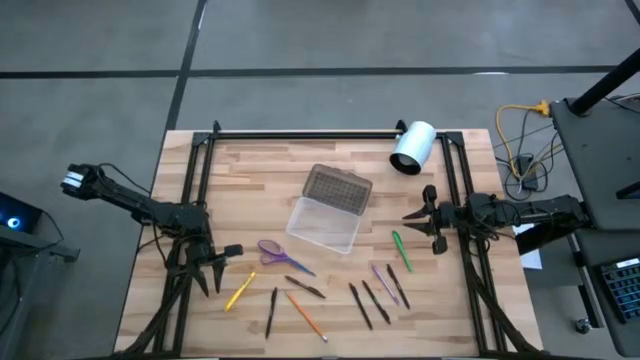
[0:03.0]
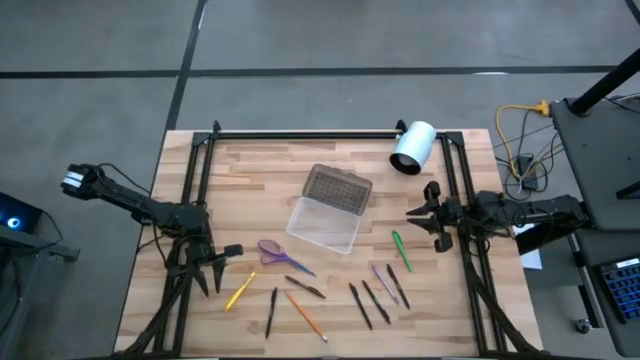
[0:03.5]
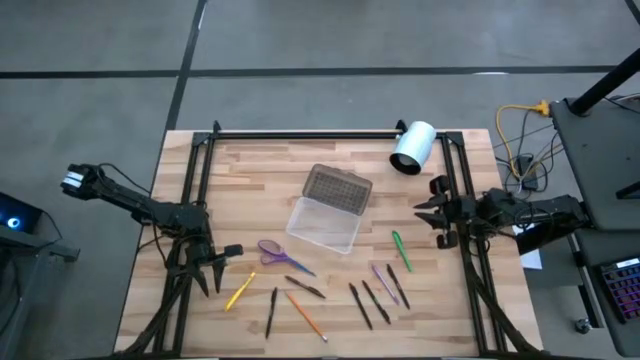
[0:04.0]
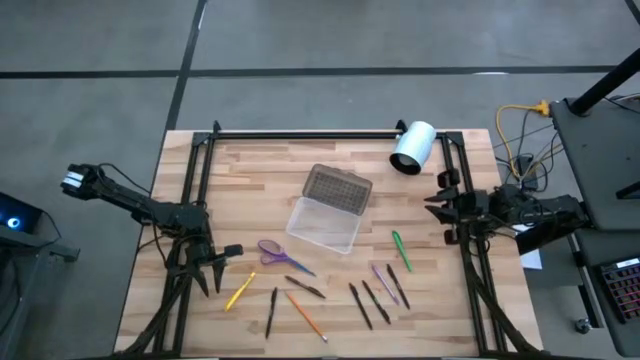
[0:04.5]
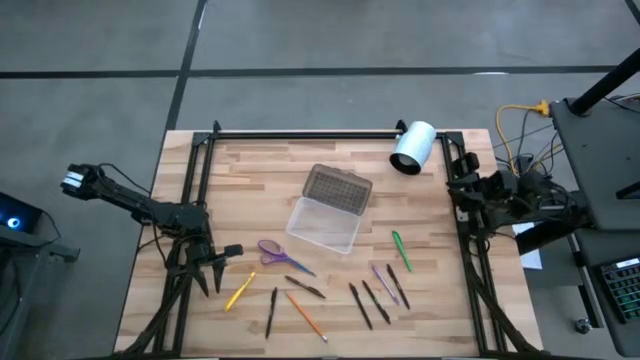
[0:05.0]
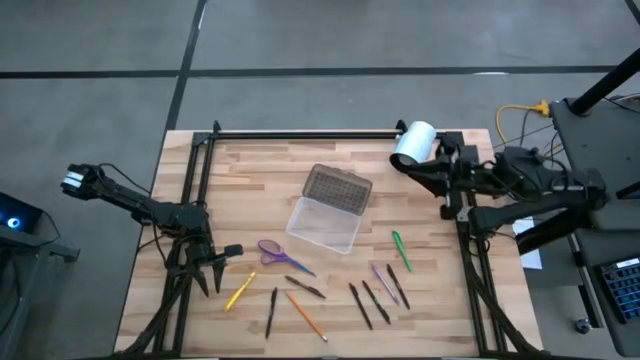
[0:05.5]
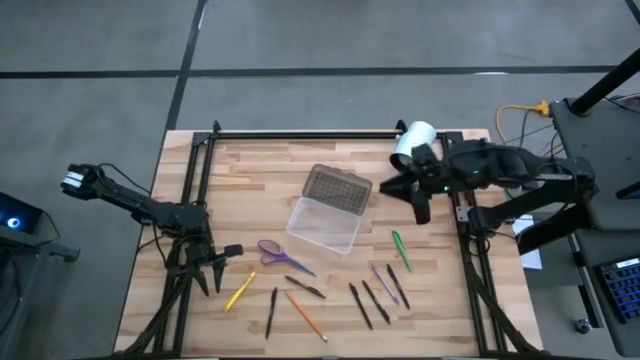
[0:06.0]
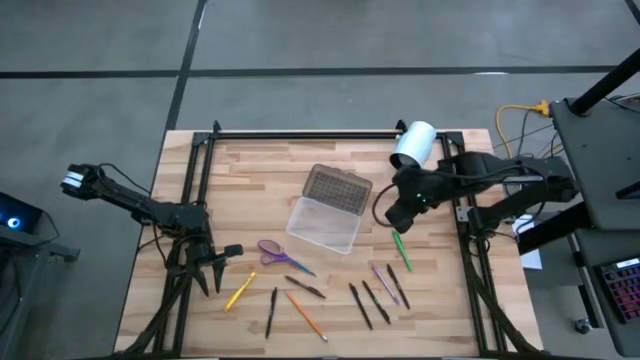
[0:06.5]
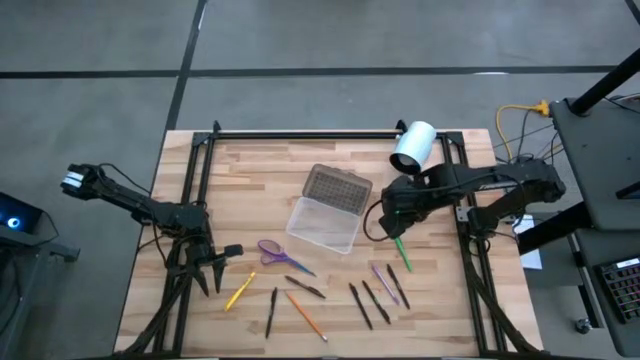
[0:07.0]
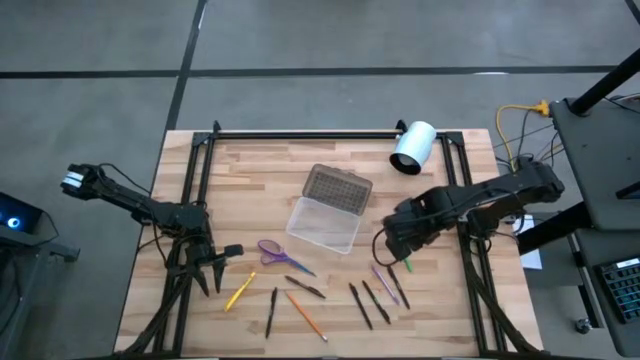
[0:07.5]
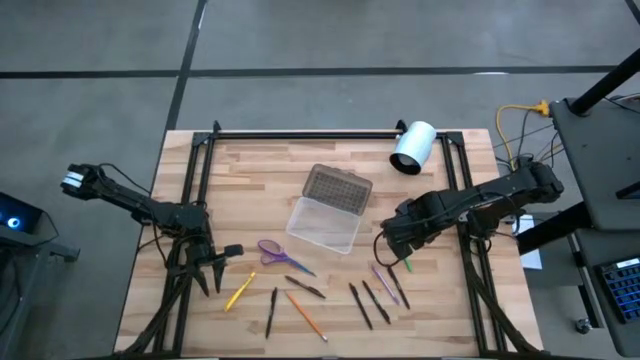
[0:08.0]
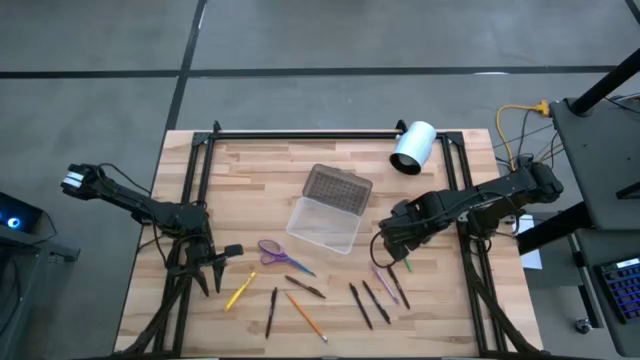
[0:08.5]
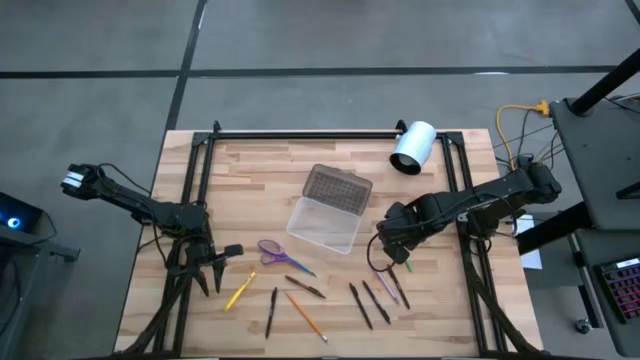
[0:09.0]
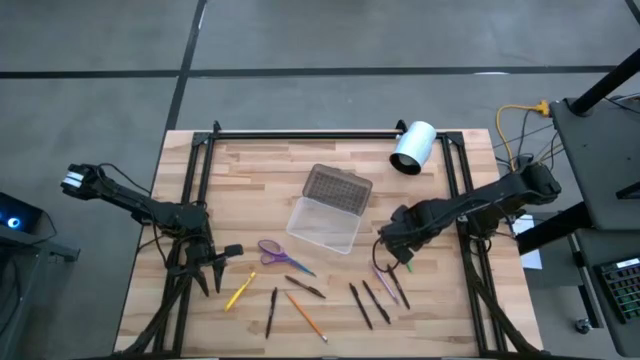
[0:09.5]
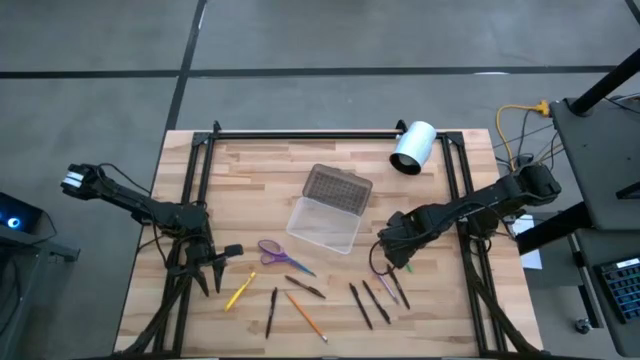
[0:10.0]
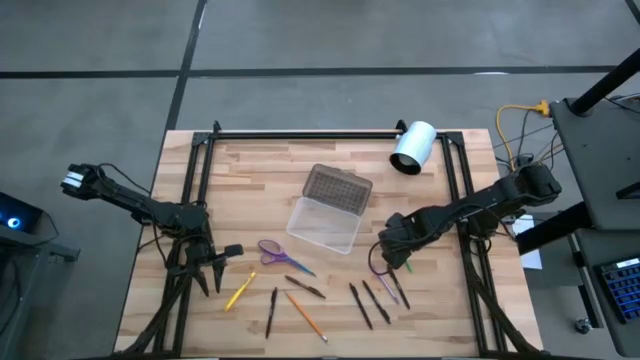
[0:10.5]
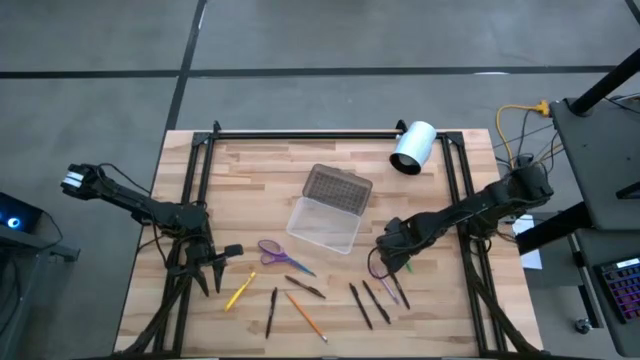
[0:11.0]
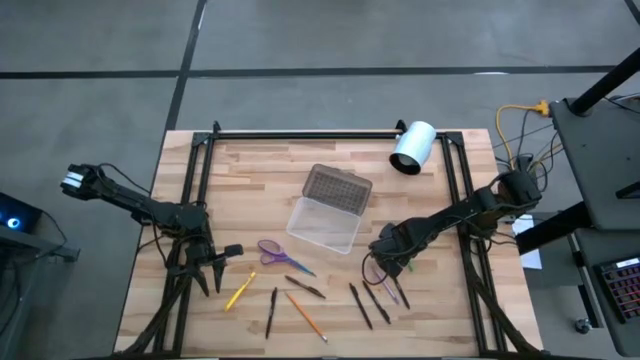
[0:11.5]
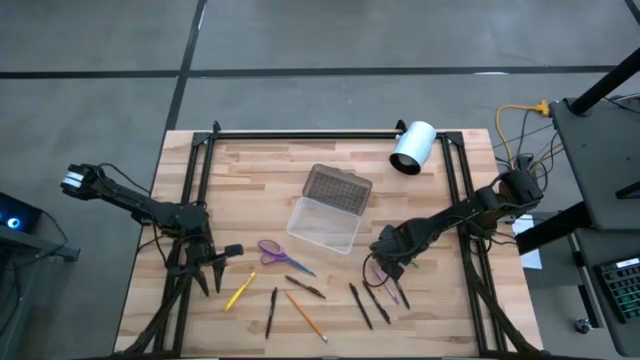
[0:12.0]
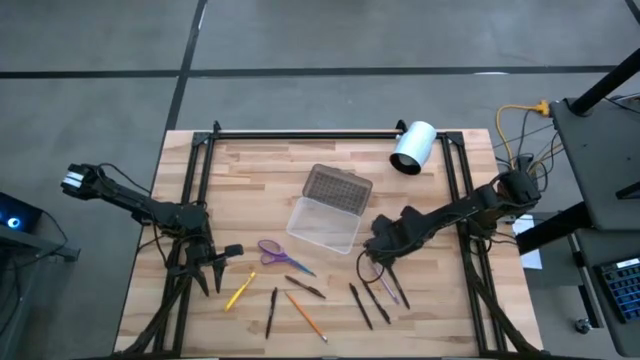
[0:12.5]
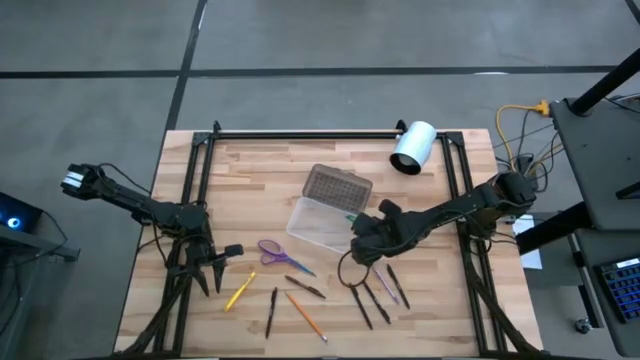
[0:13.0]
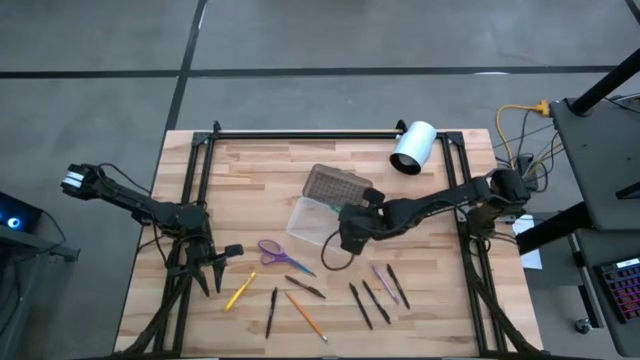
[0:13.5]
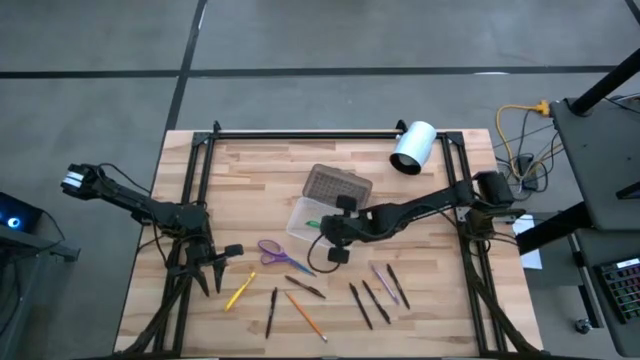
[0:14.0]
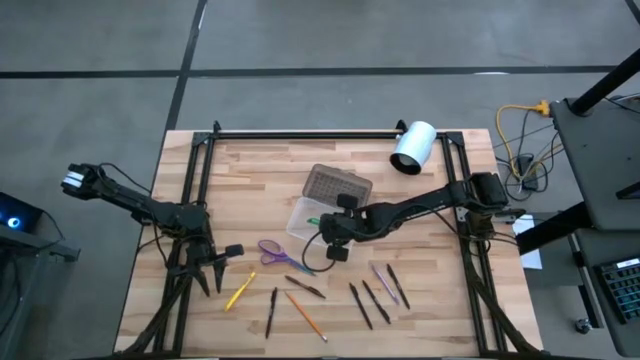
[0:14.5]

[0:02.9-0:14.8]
Task: Pick & place school supplies into a supply box
Put the green pen into the supply box

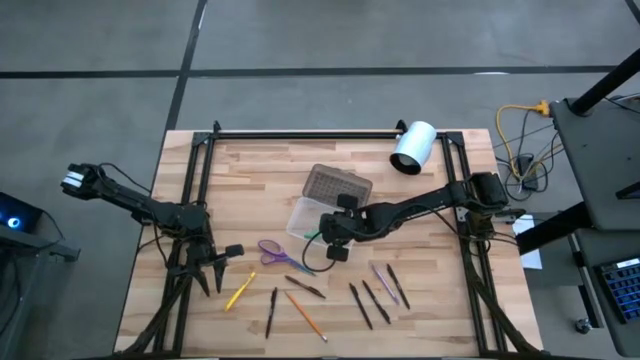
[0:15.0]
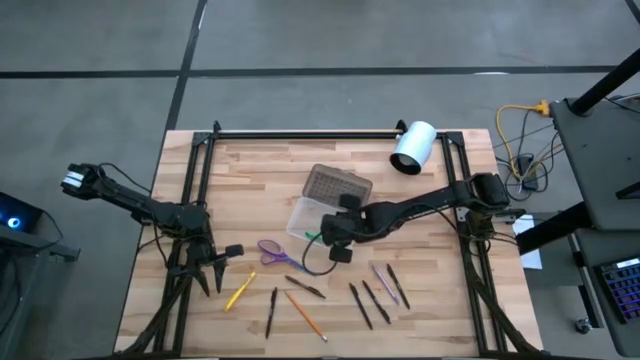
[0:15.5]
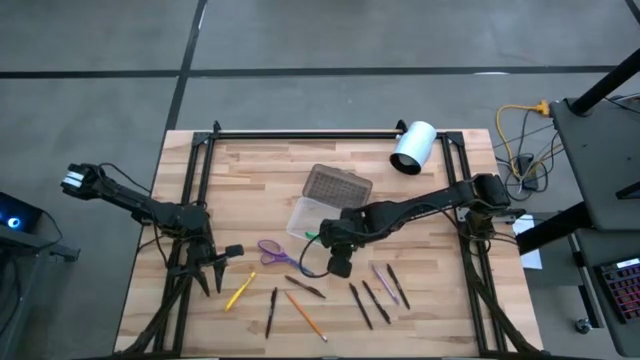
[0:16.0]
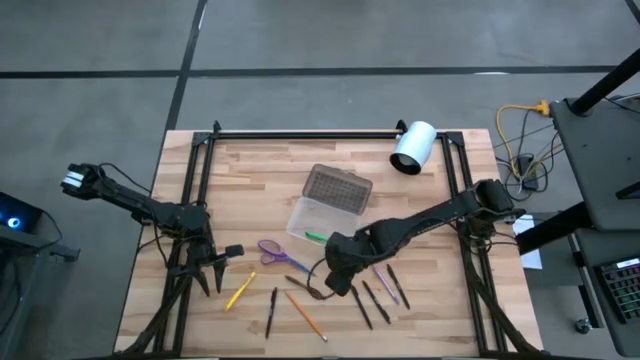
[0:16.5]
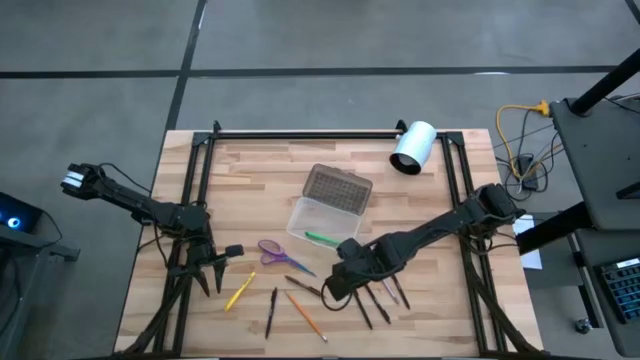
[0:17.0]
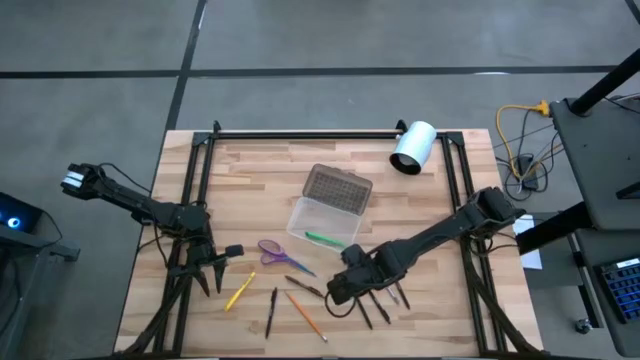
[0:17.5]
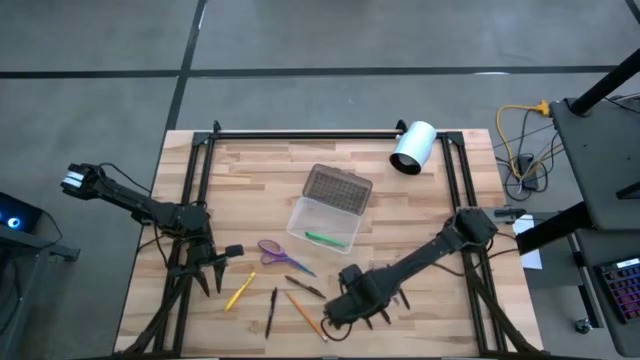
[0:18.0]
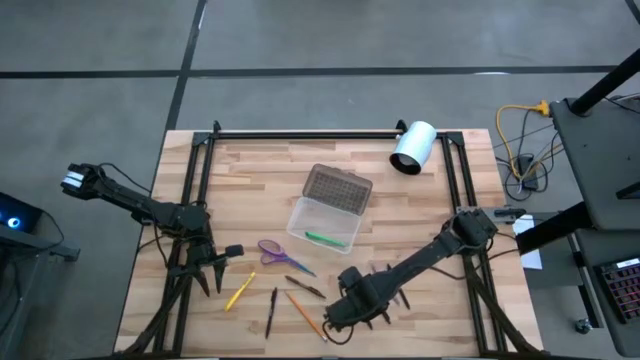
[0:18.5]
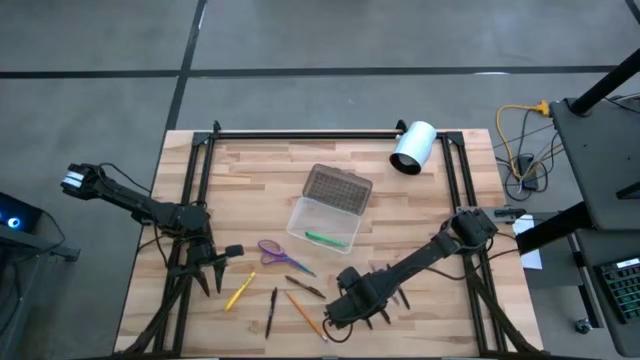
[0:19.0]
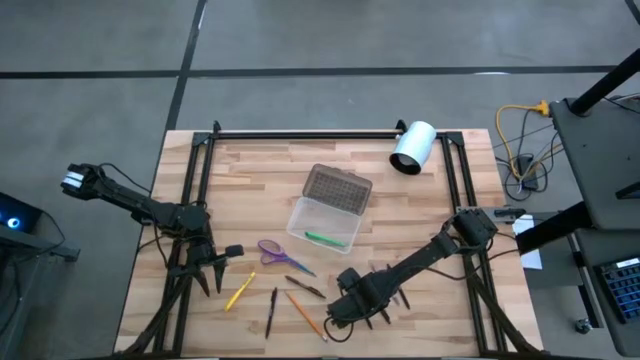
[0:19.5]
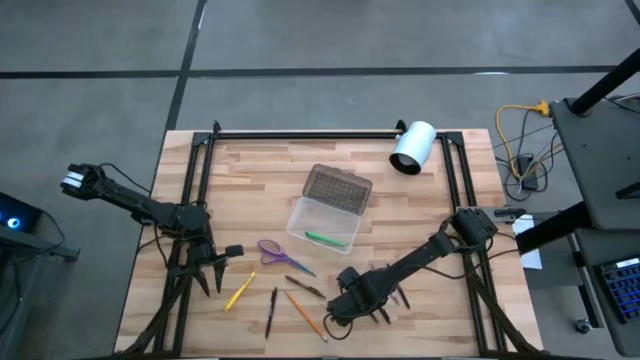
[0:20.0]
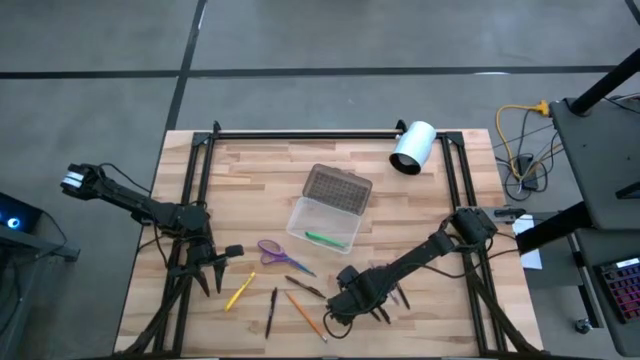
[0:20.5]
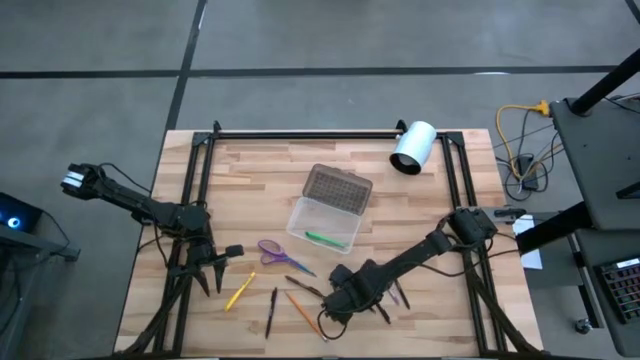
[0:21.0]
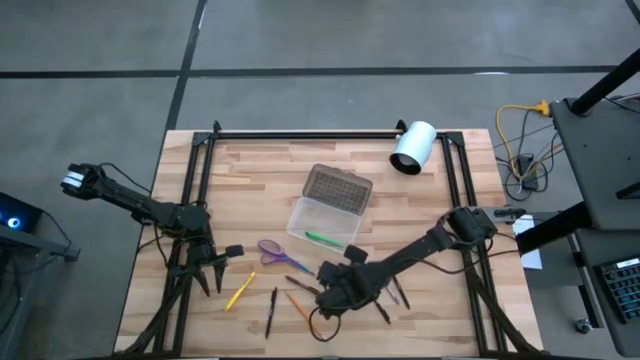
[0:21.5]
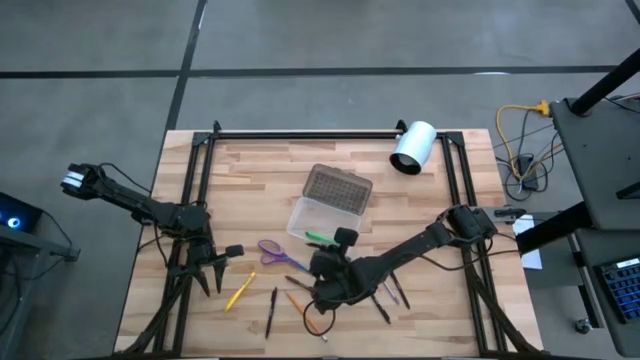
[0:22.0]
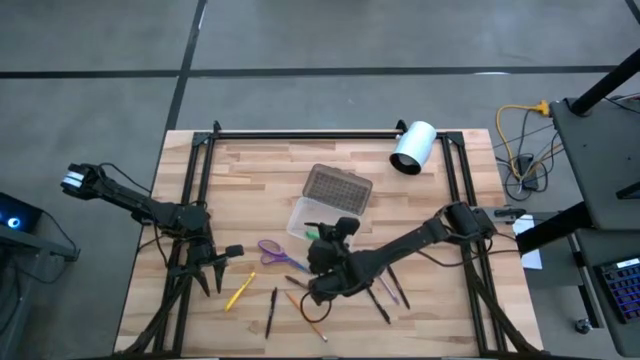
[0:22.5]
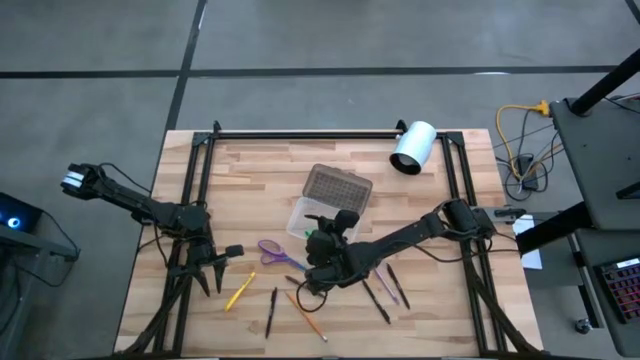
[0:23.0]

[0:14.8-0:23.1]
Put the black pen into the supply box

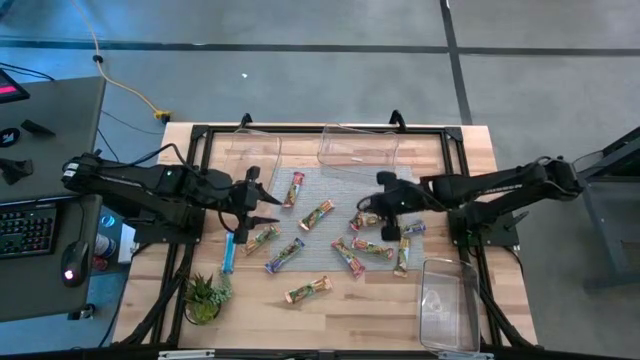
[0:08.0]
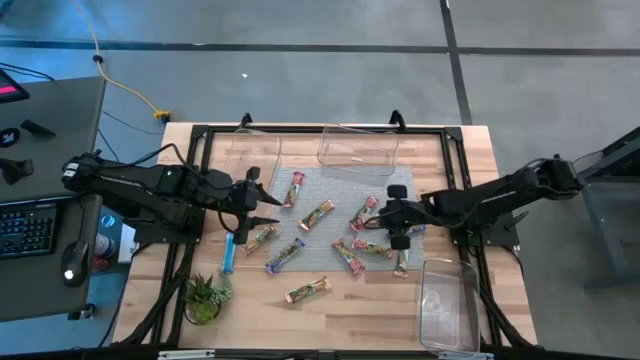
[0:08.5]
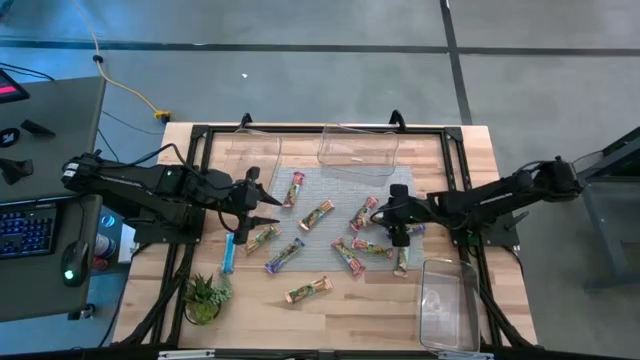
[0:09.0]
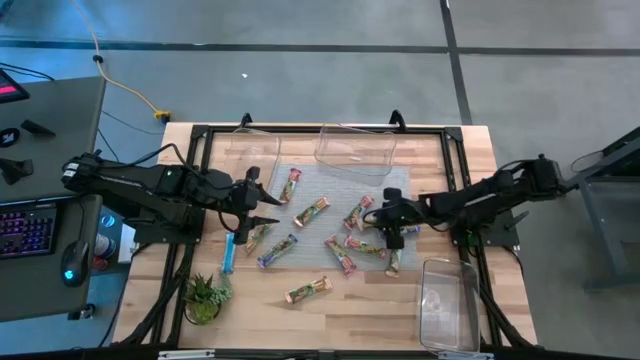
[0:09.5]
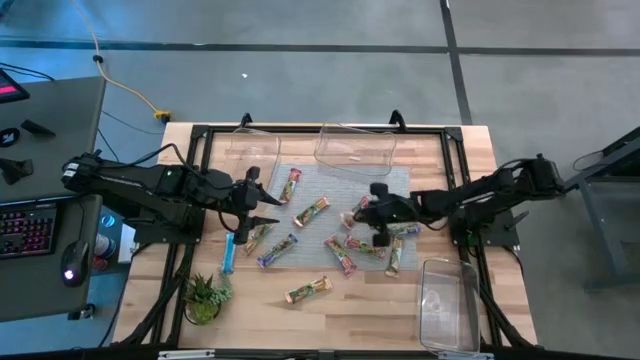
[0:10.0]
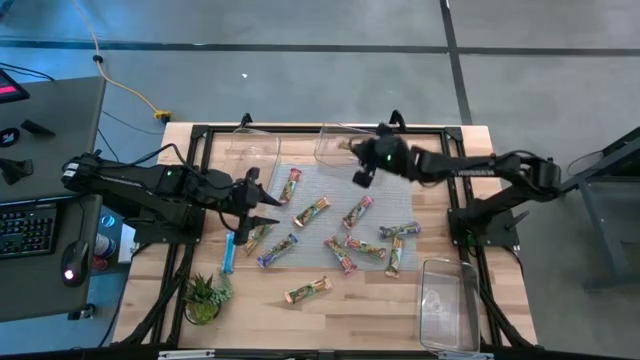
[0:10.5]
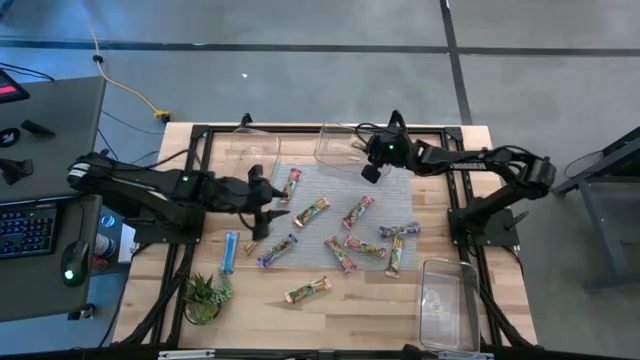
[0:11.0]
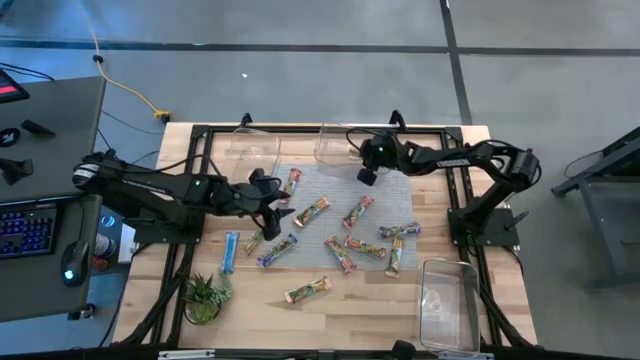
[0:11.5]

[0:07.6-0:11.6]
Task: Pick and place Granola Bars by type
Put the yellow granola bar into the top right transparent bin
